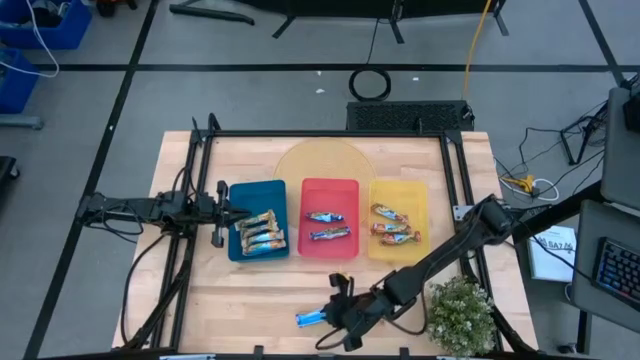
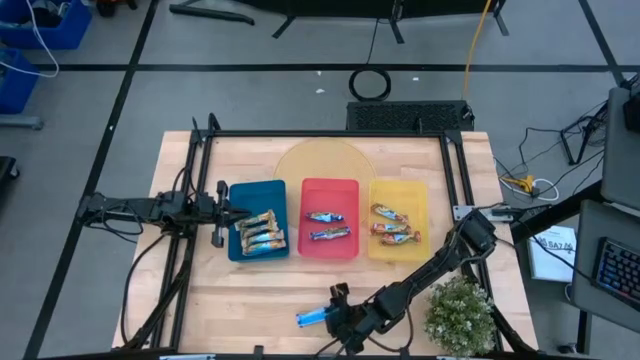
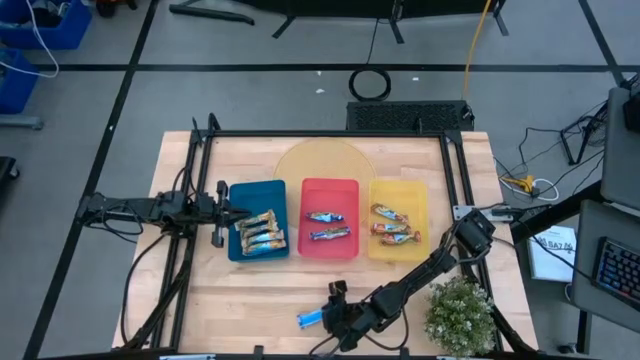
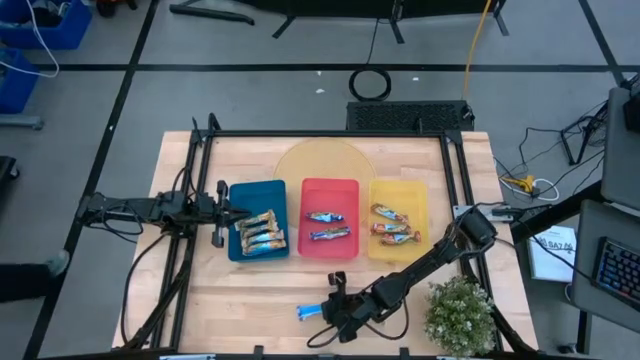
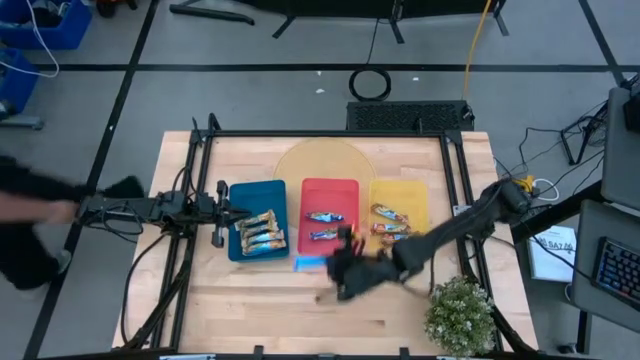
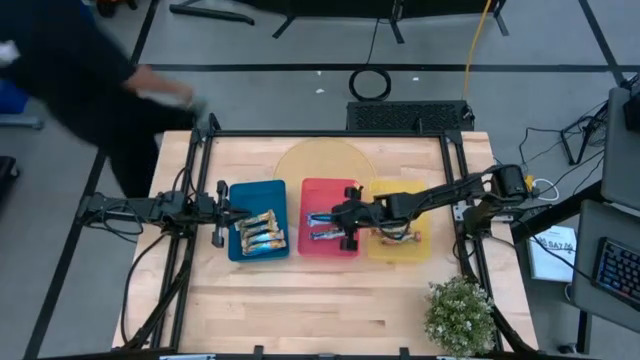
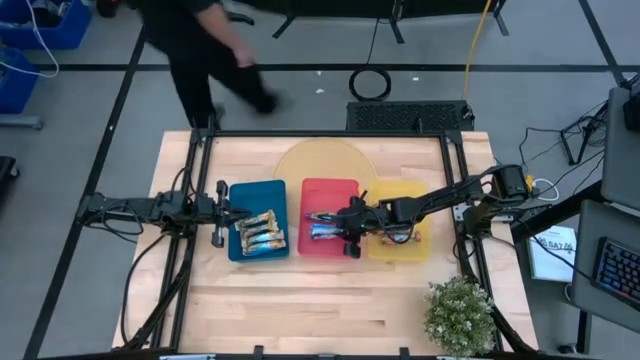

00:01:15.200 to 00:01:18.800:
Task: Pick and place Granola Bars by type
Put the blue granola bar into the red bin

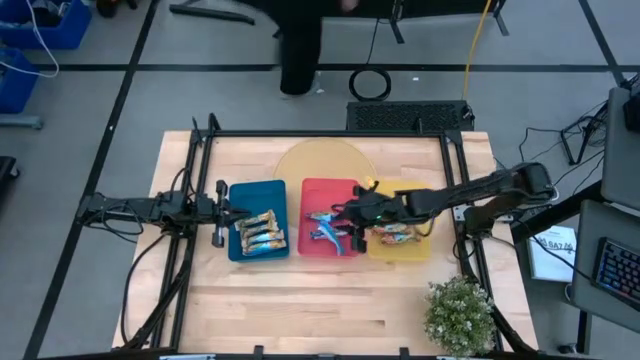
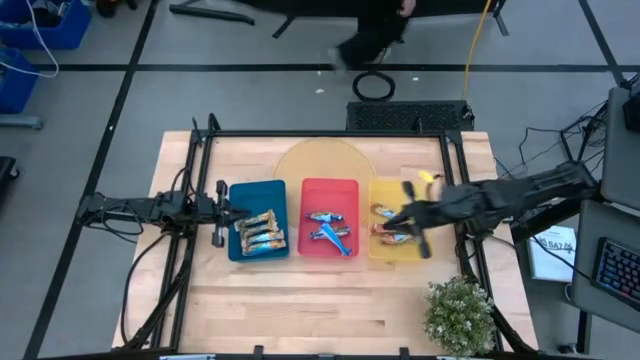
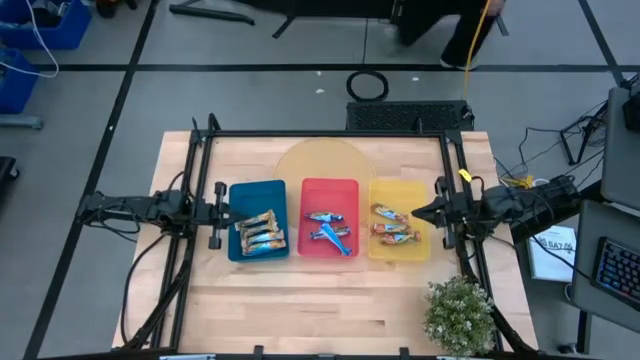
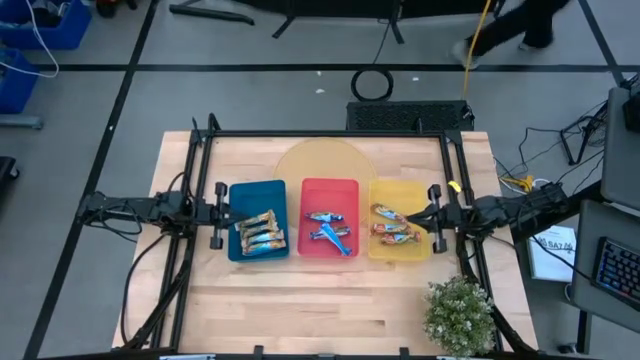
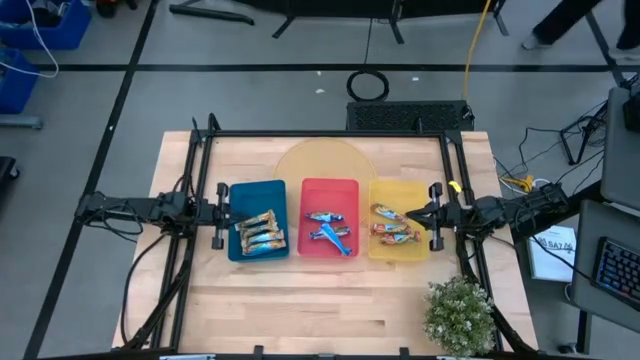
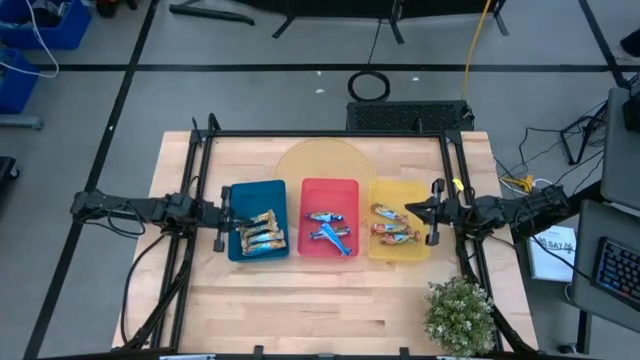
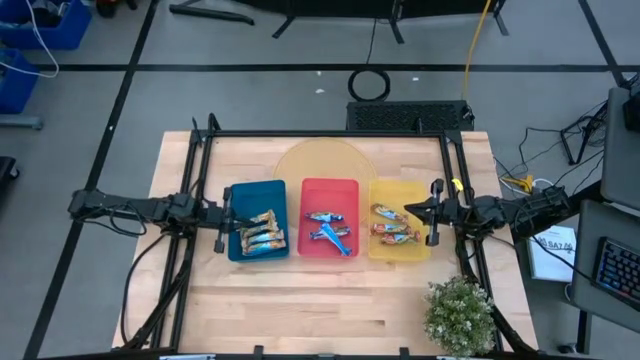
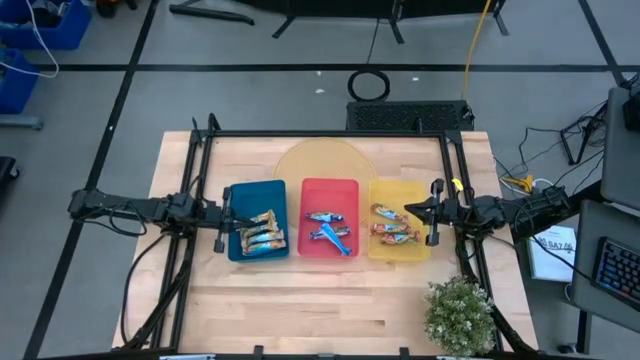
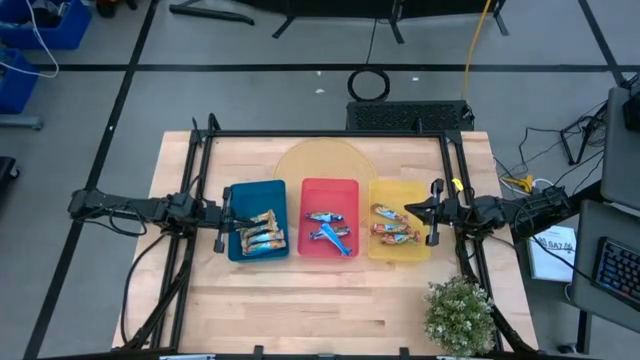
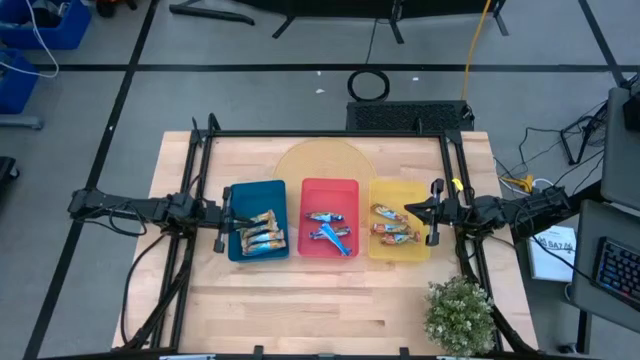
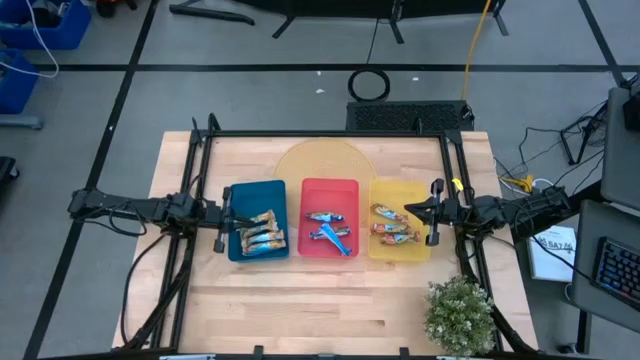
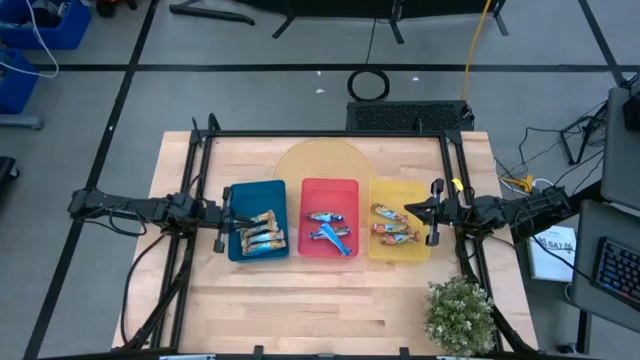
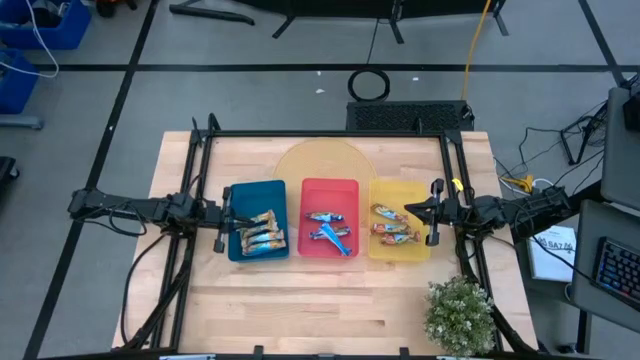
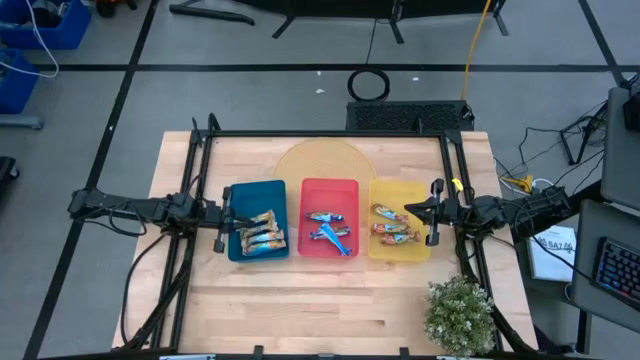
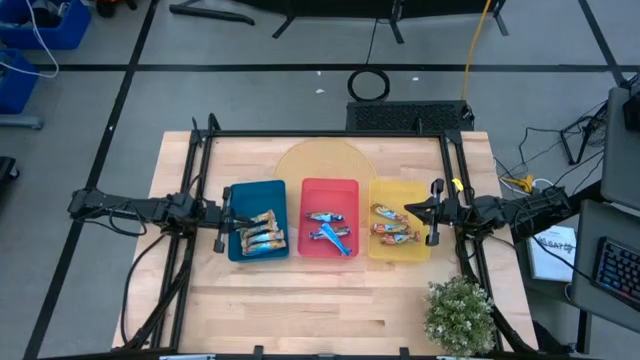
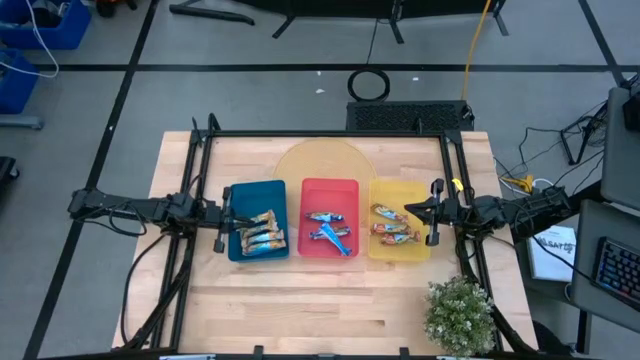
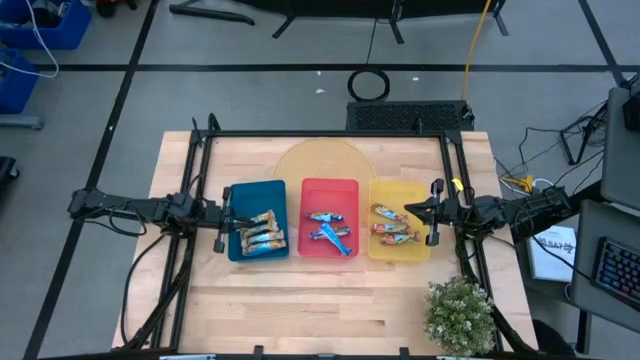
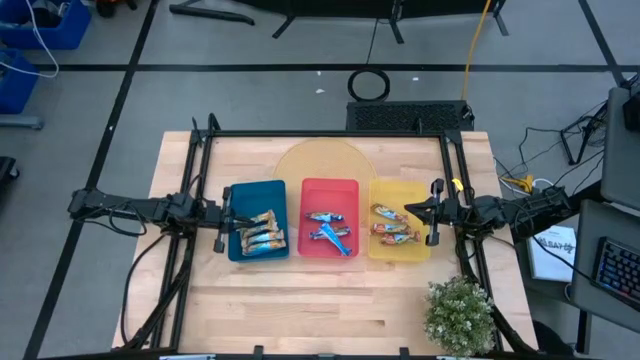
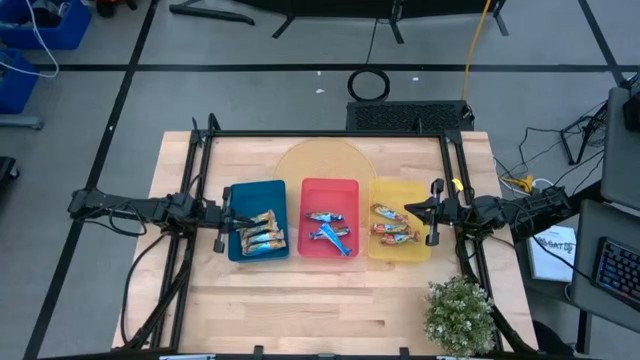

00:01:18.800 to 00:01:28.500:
Return to Home Position

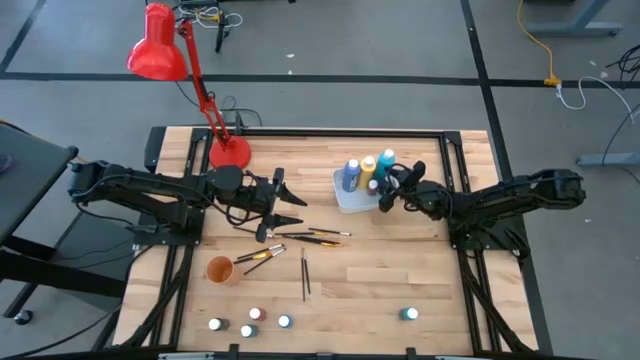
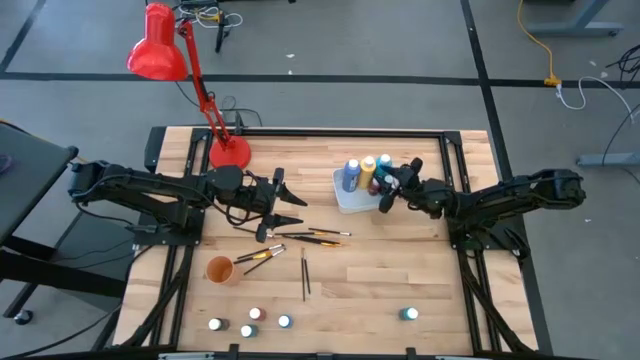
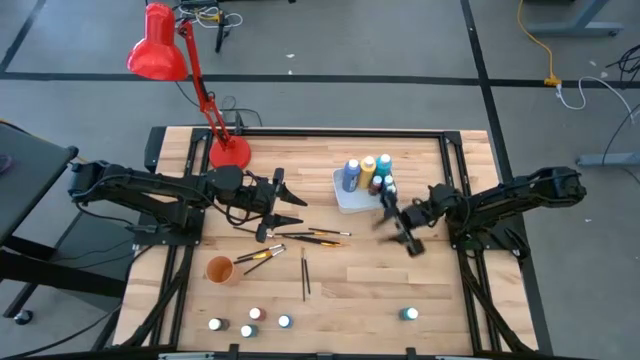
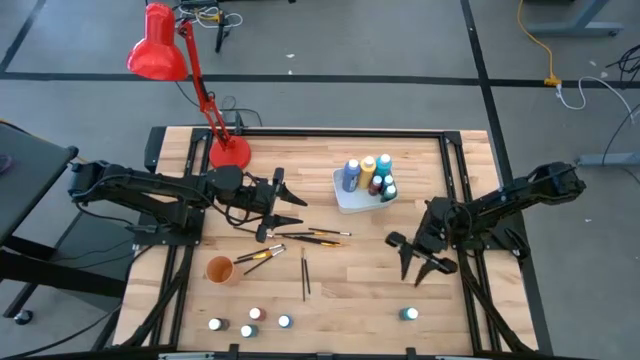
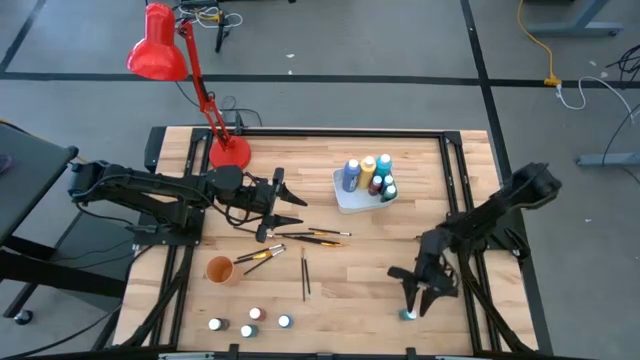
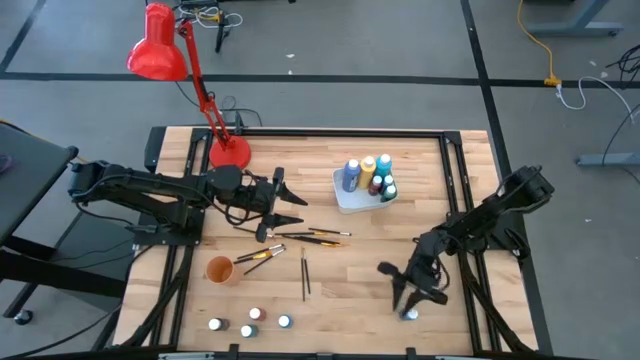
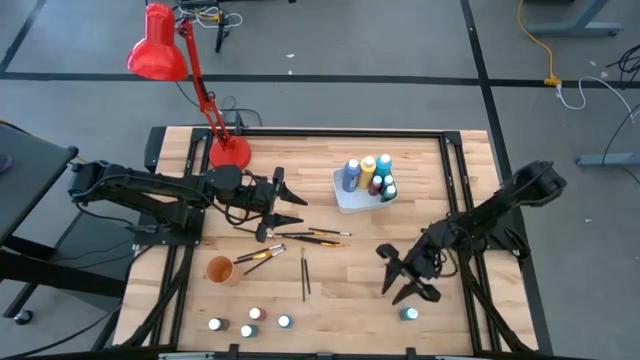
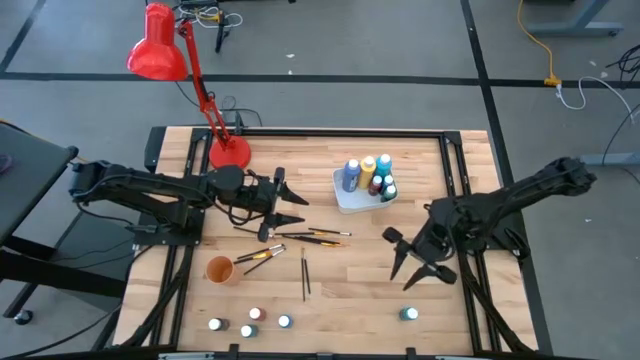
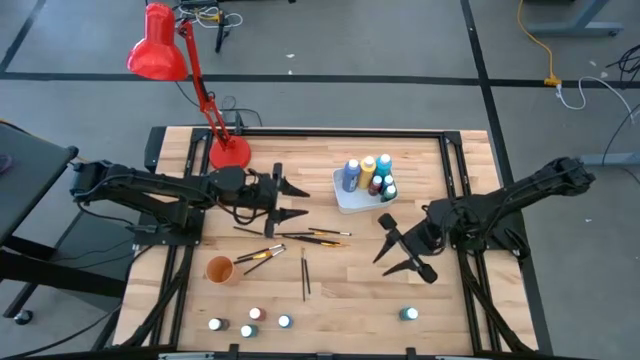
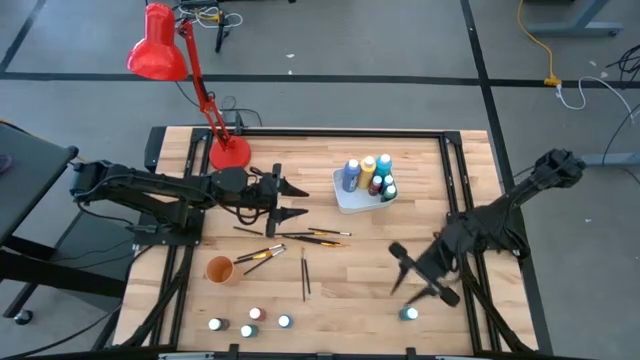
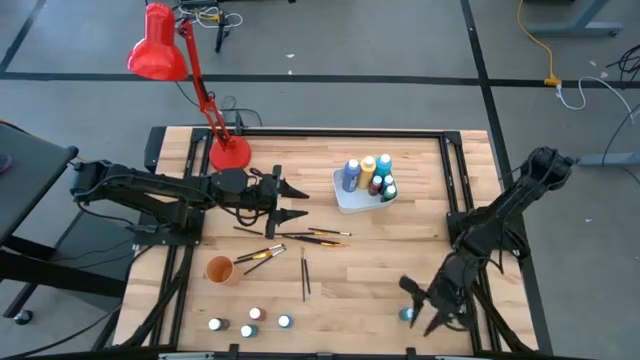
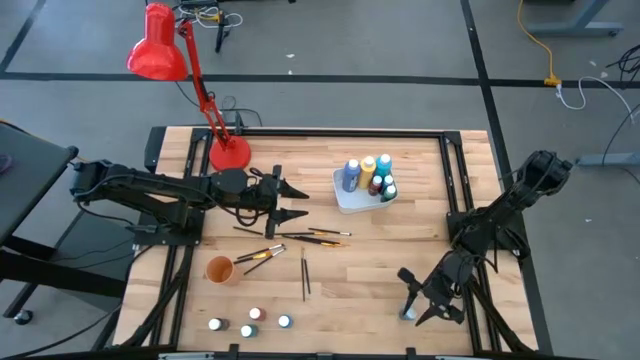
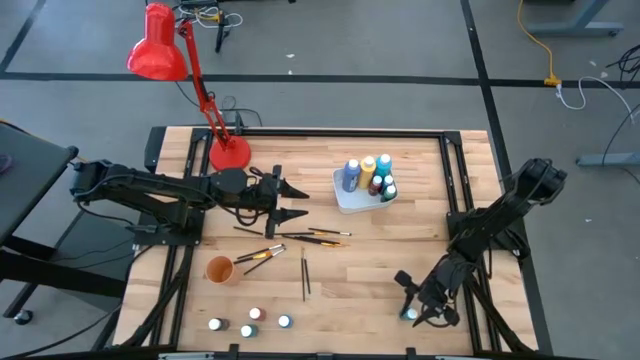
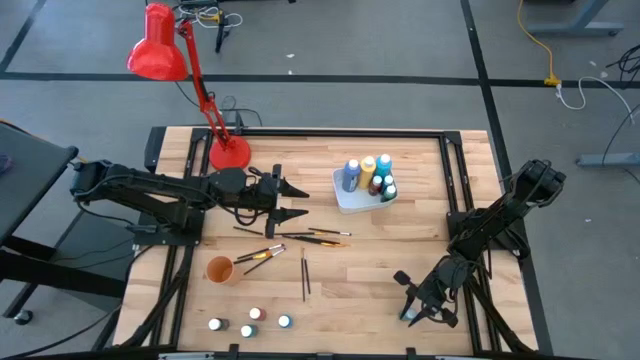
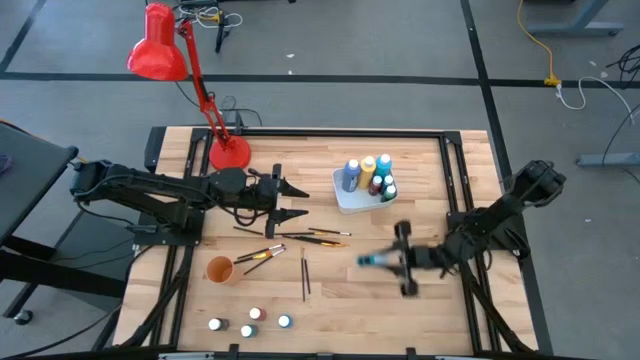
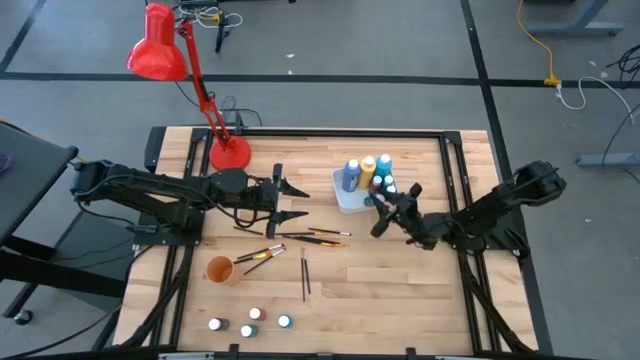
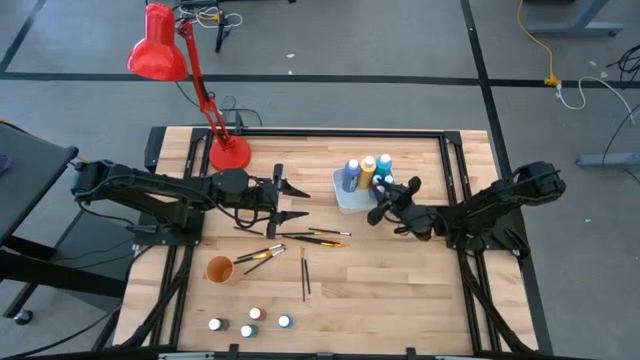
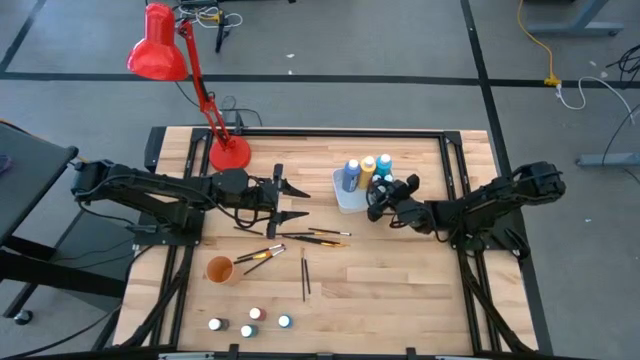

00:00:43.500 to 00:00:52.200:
Task: Pick & Place Paint Supplies
Put the small light blue paint bottle into the white bin
